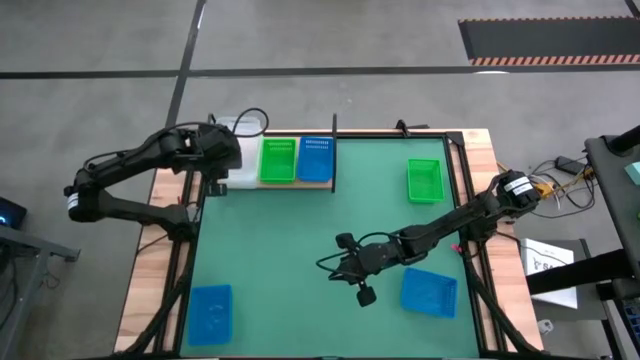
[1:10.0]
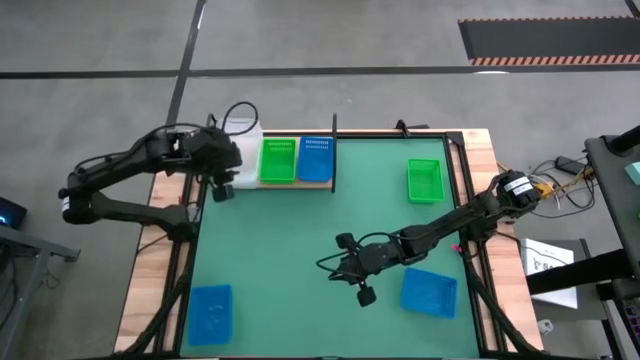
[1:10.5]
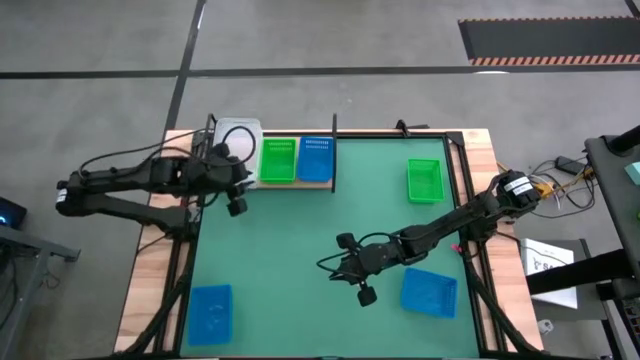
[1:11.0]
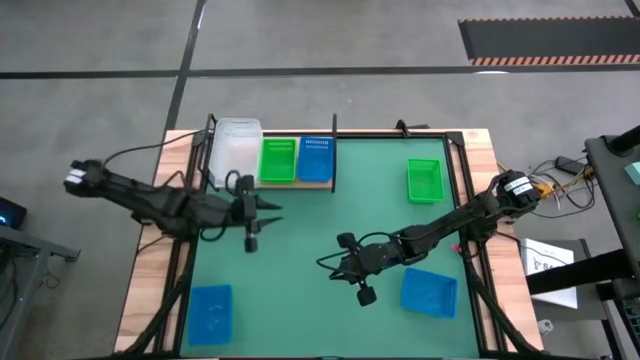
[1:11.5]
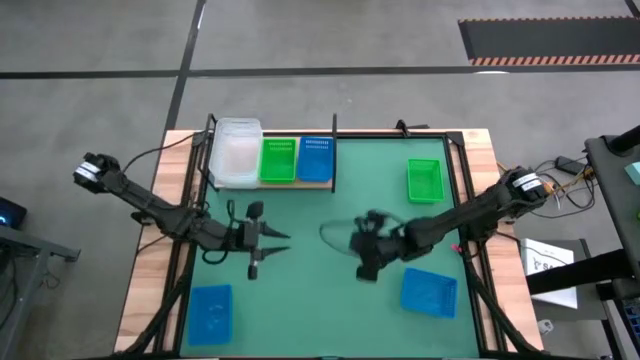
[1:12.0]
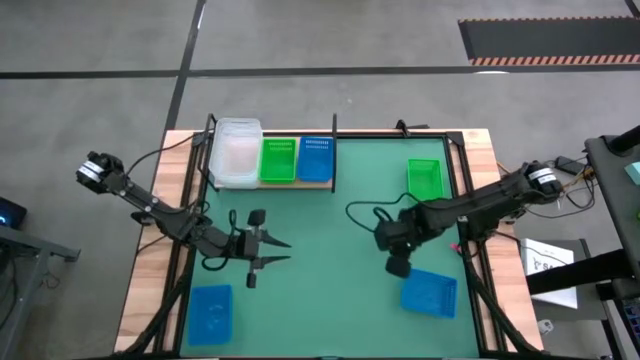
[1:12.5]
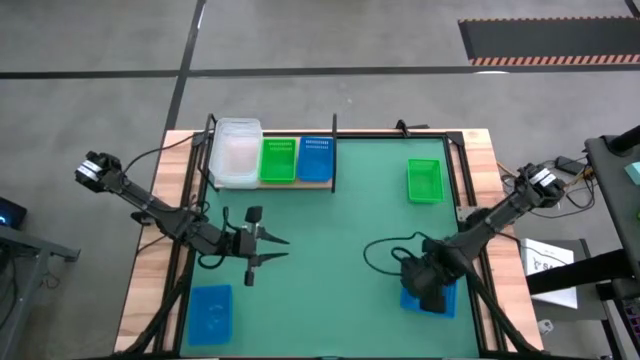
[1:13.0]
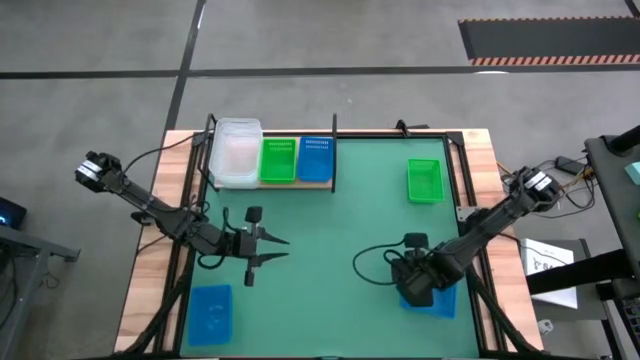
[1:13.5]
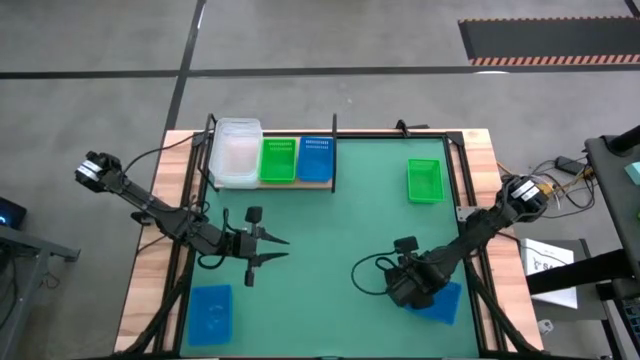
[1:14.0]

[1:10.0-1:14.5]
Task: Stack baskets on shelf by color
Stack the right blue bin on top of the other blue bin on the shelf

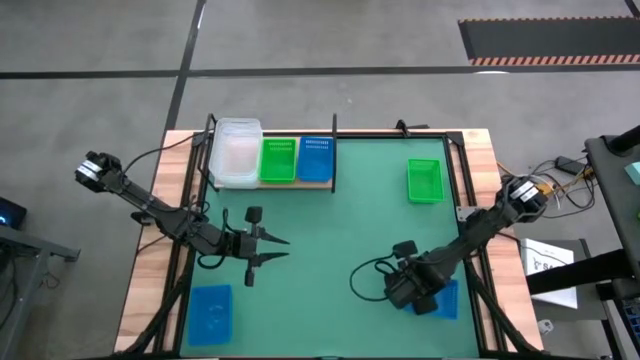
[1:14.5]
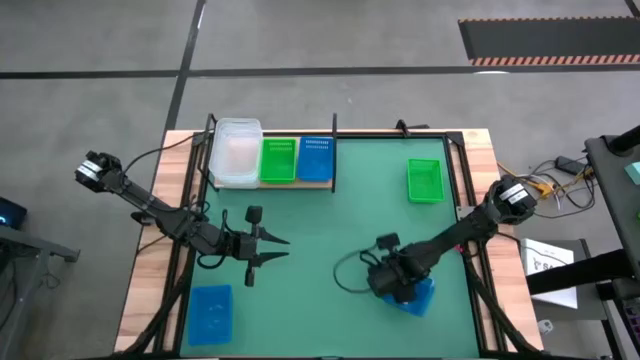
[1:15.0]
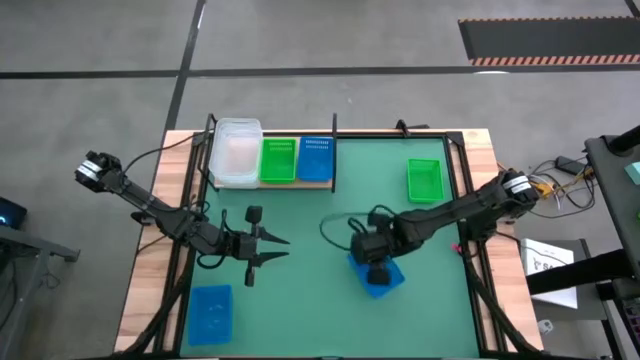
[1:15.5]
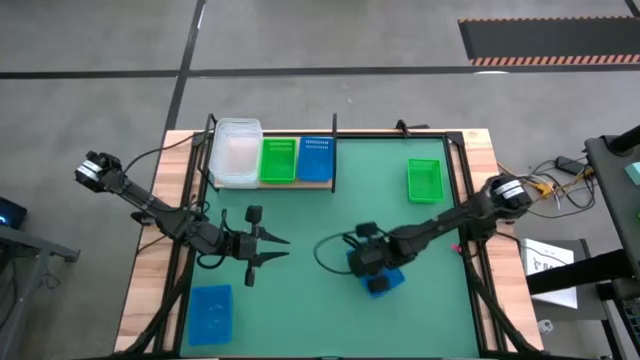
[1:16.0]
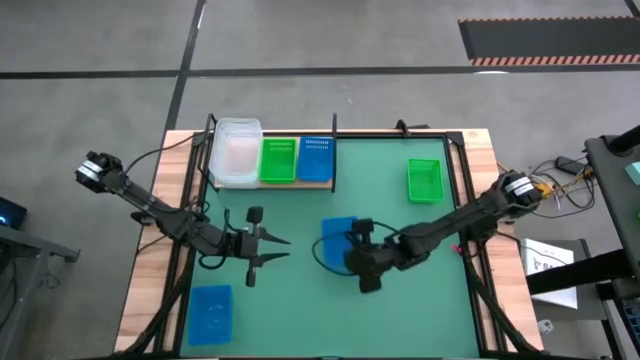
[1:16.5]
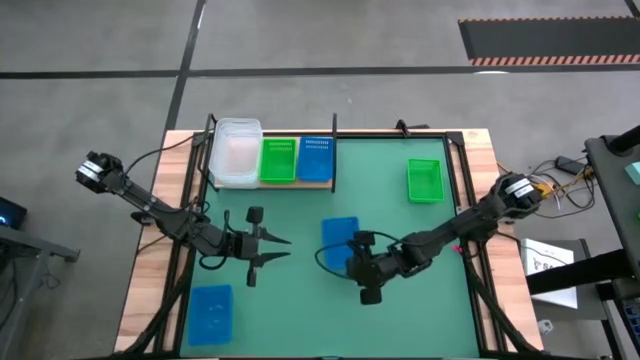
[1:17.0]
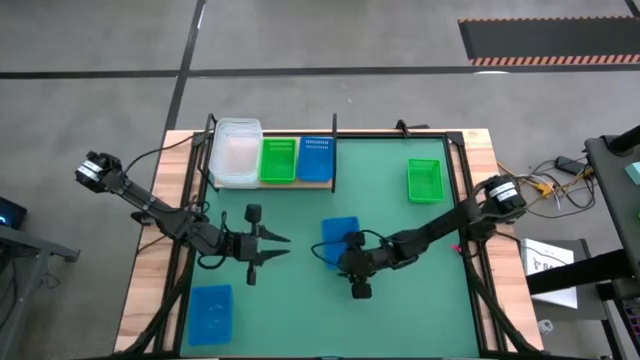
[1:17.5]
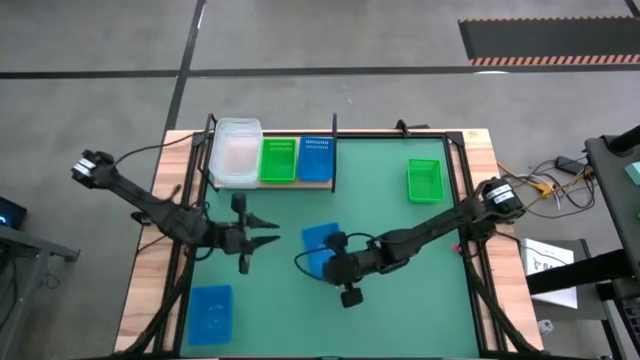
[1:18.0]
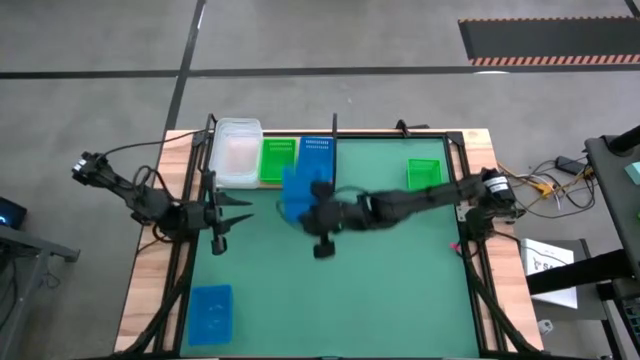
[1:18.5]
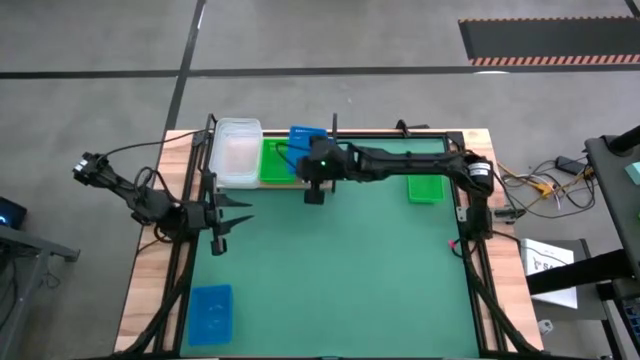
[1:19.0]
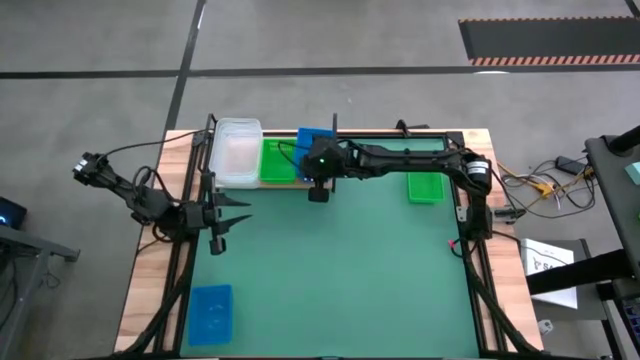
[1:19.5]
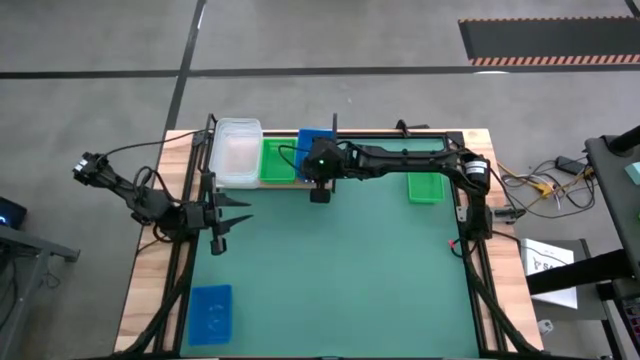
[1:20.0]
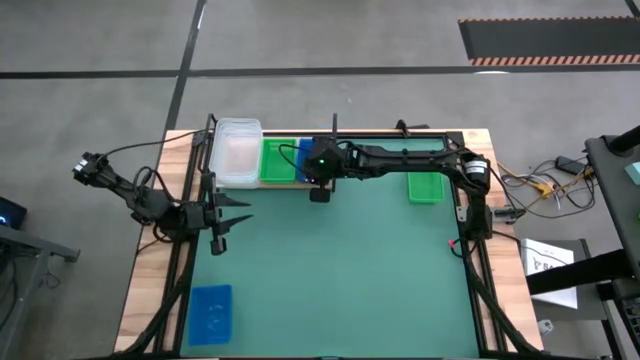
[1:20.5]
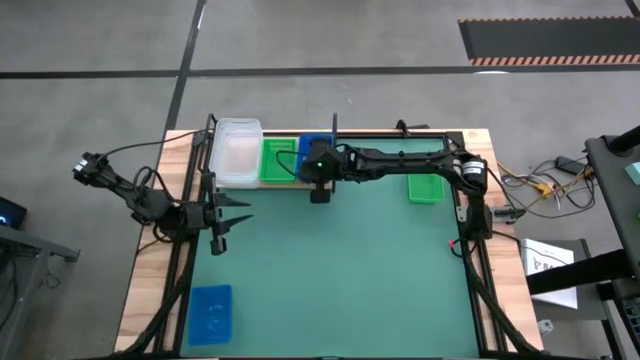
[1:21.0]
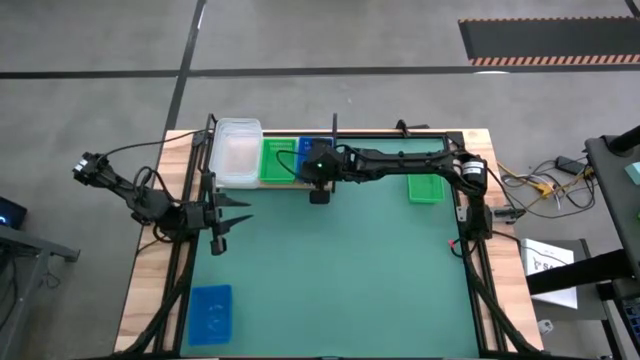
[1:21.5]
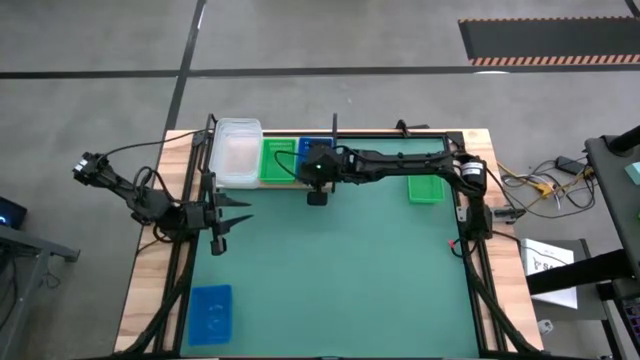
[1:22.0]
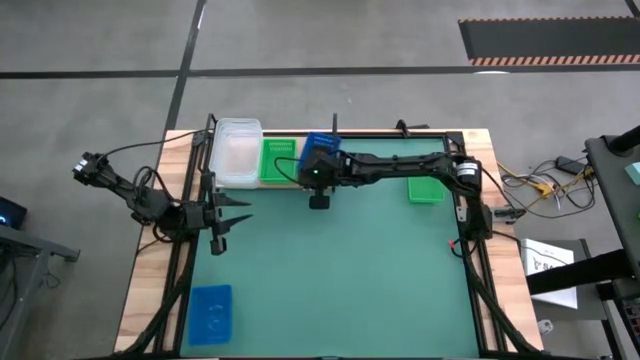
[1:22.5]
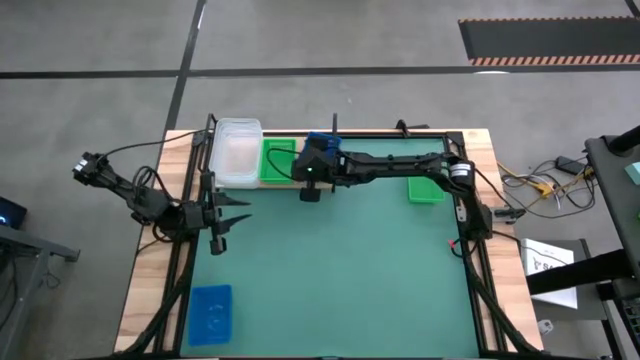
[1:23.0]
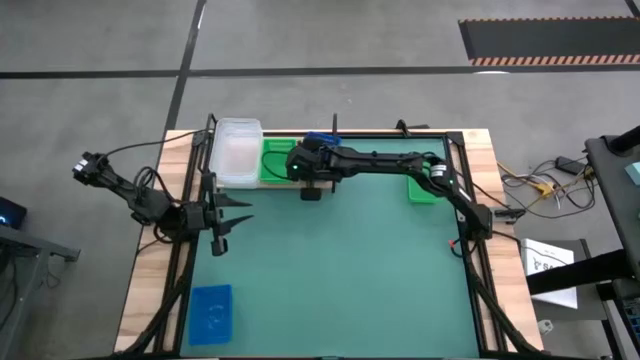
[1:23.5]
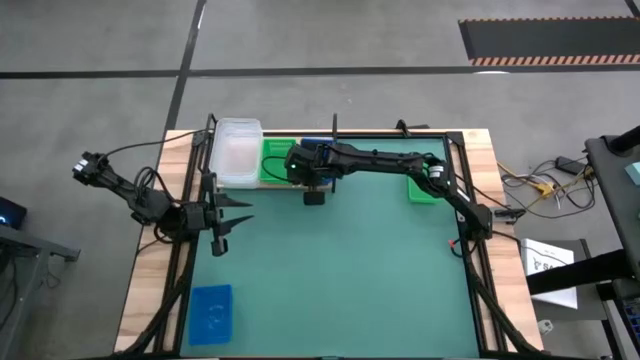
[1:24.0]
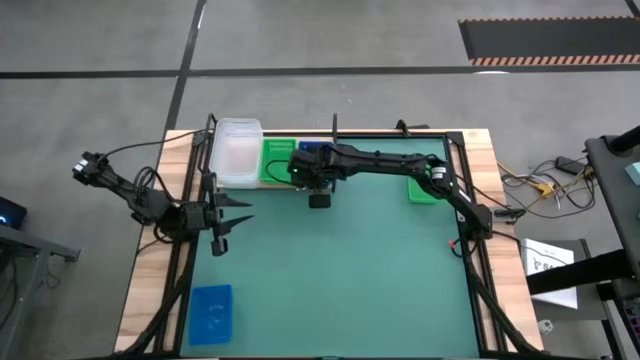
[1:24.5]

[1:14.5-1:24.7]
Stack the right blue bin on top of the other blue bin on the shelf

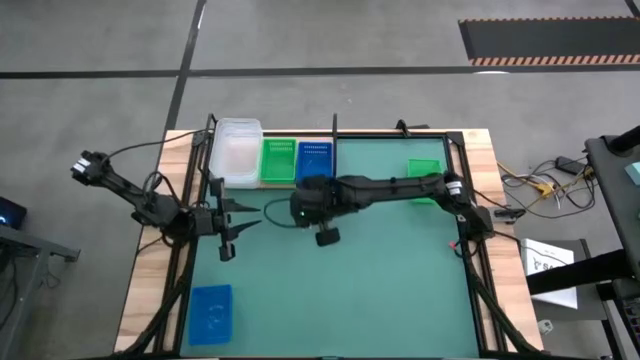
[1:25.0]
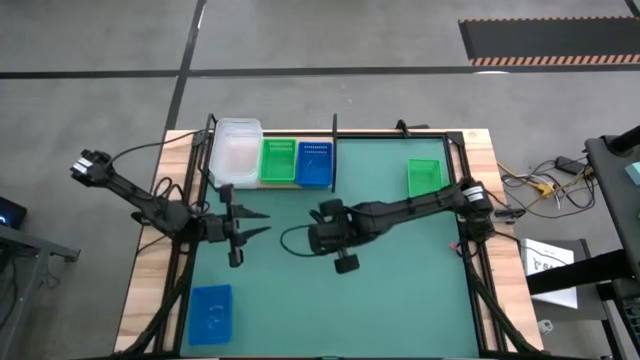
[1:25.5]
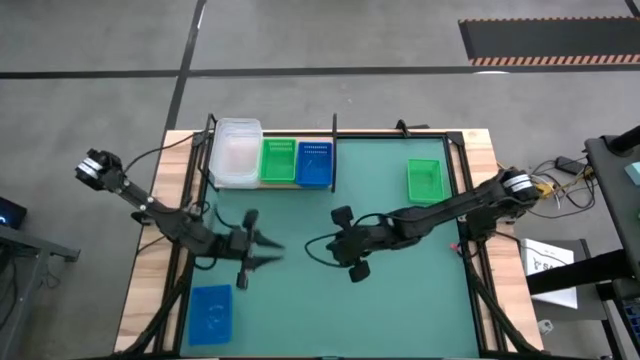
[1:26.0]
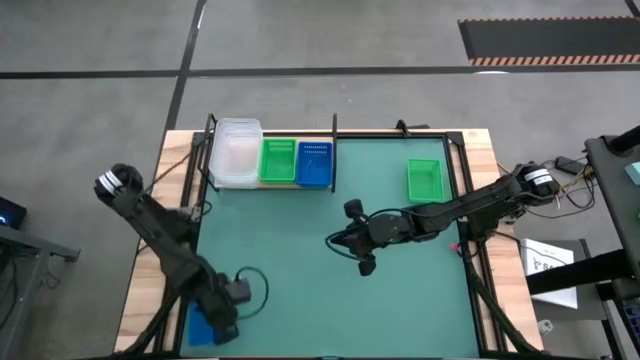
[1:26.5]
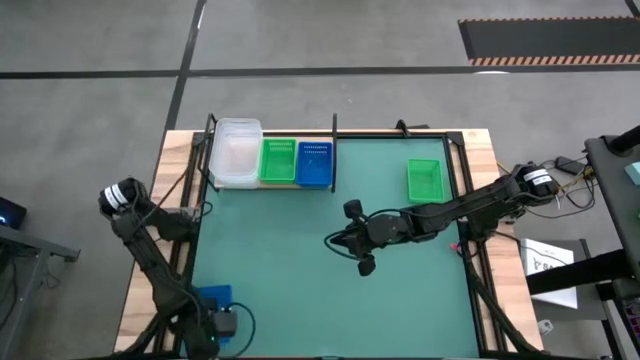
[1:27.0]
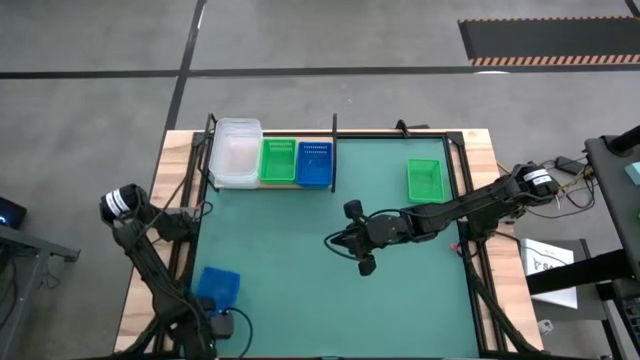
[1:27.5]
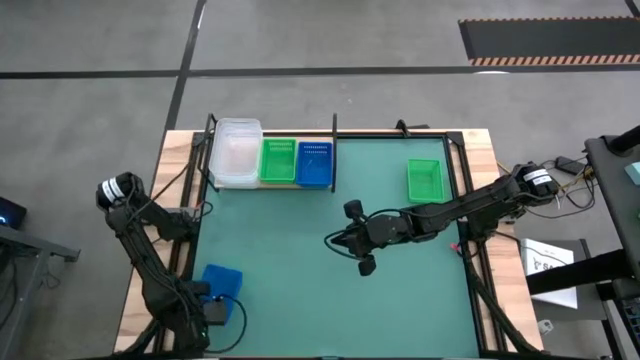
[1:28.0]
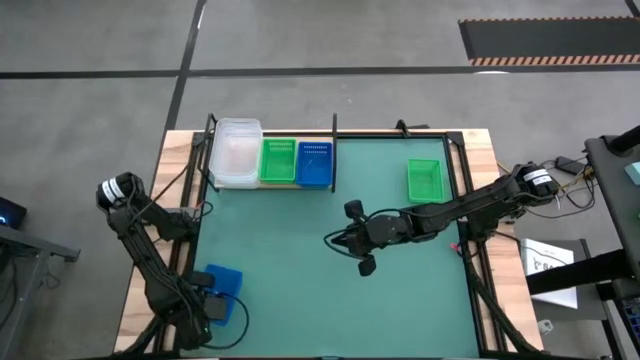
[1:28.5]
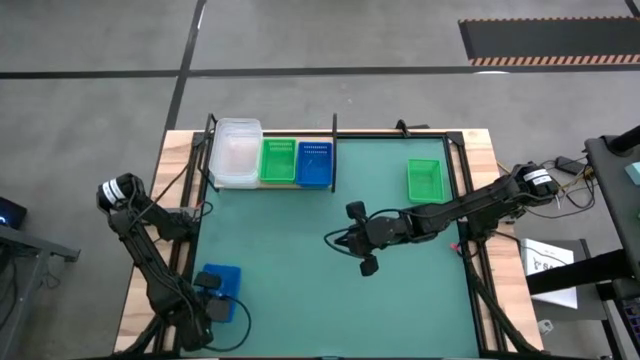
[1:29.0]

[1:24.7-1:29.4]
Stack the blue bin on top of the other blue bins on the shelf
